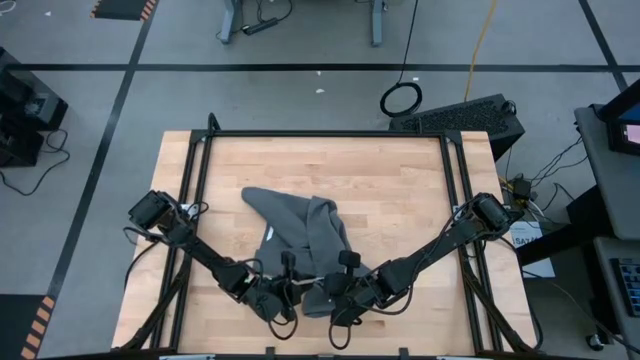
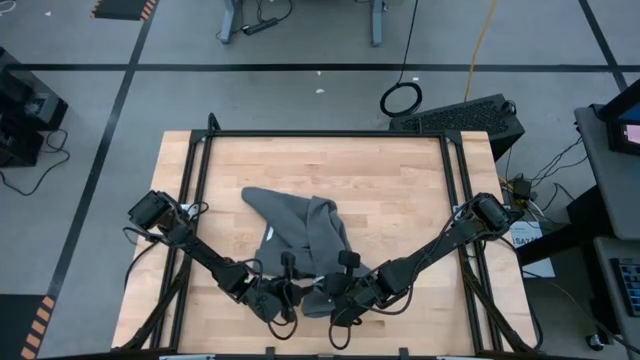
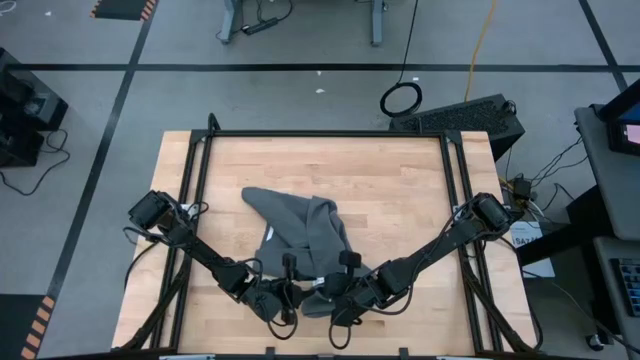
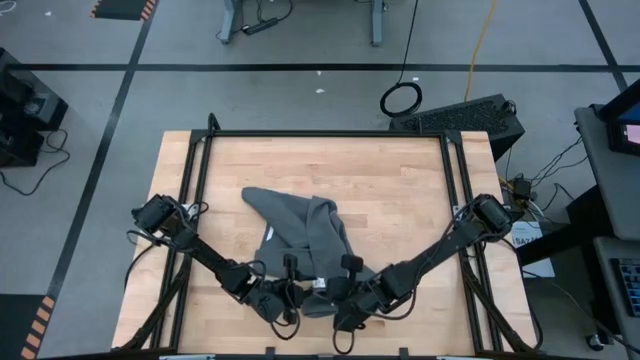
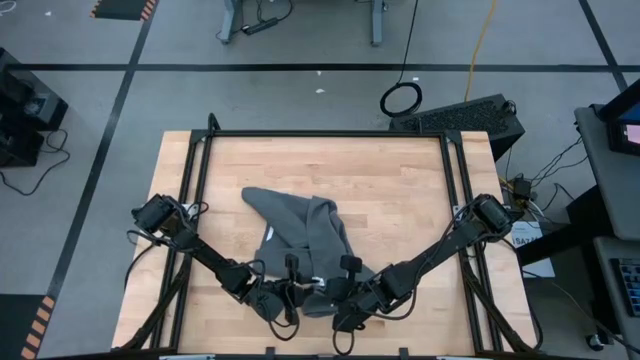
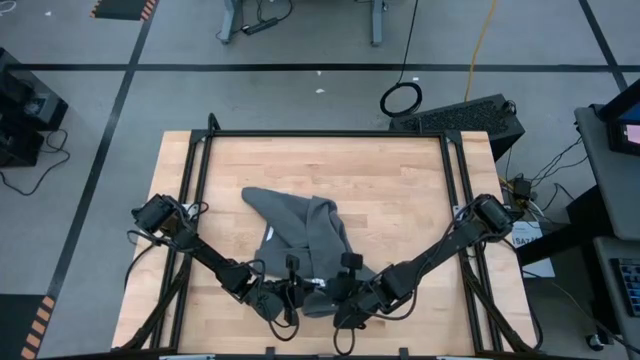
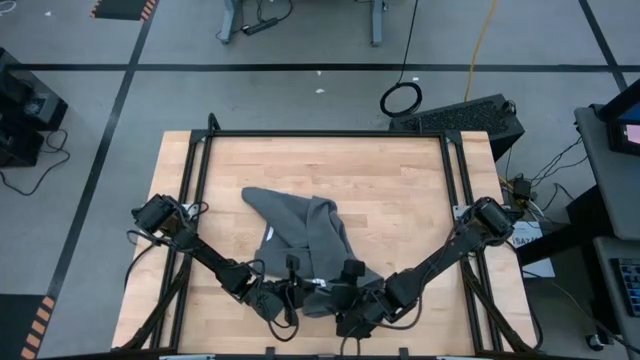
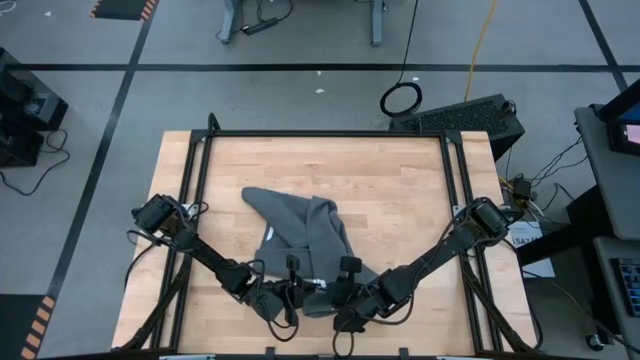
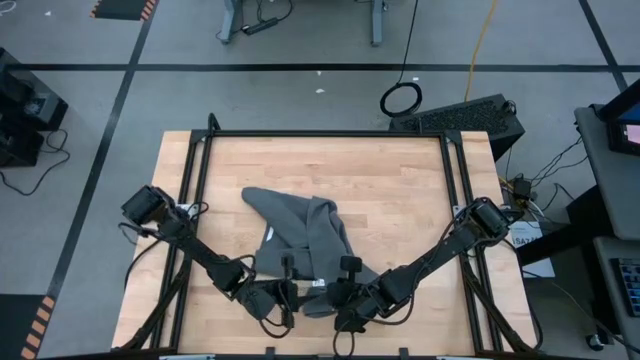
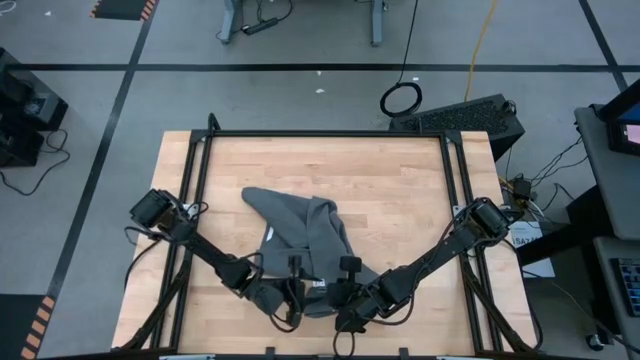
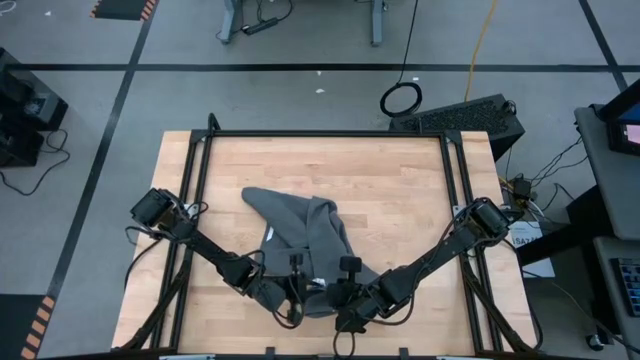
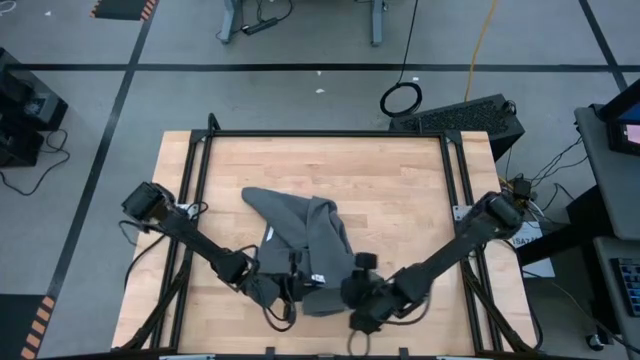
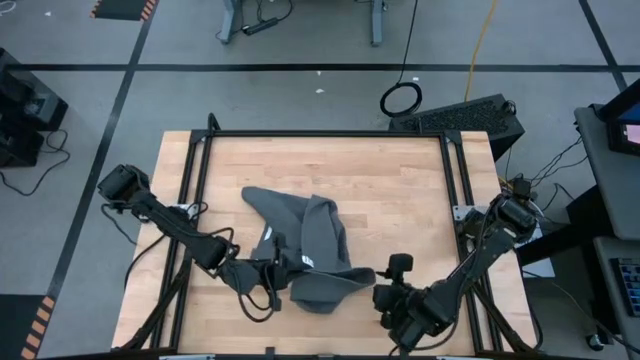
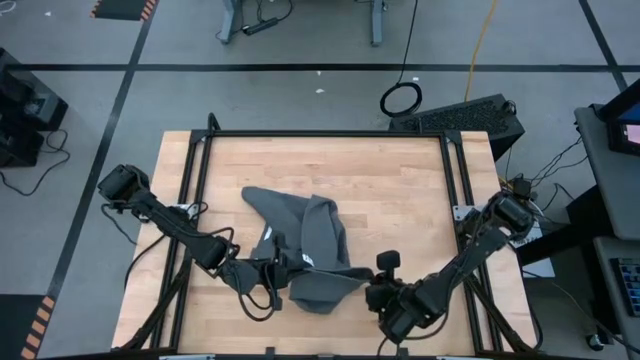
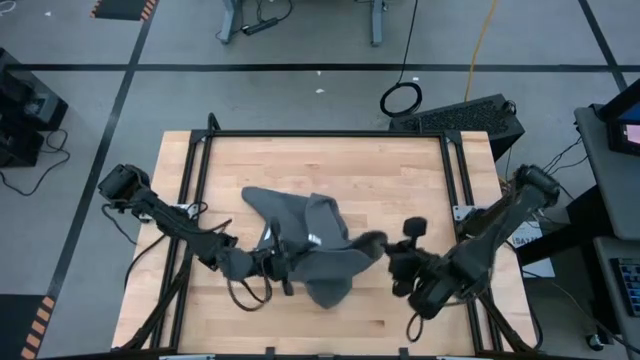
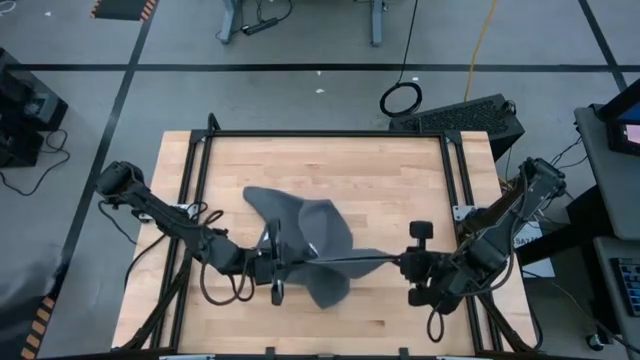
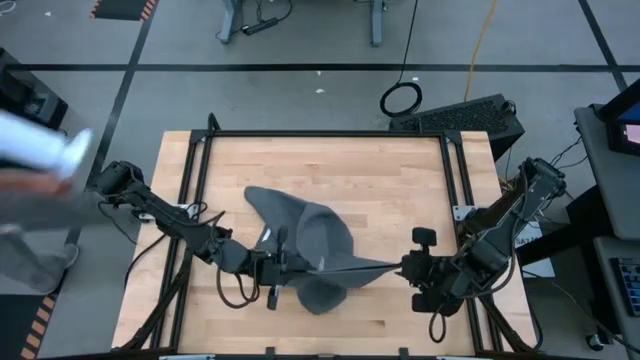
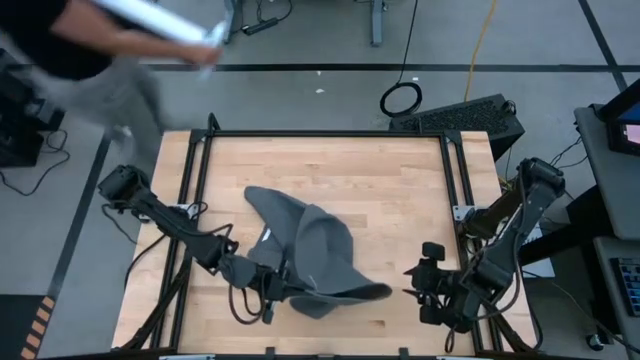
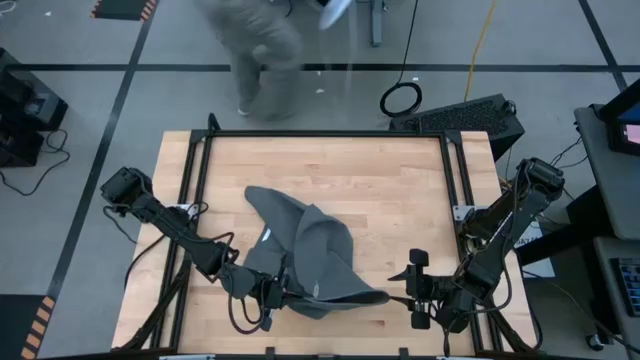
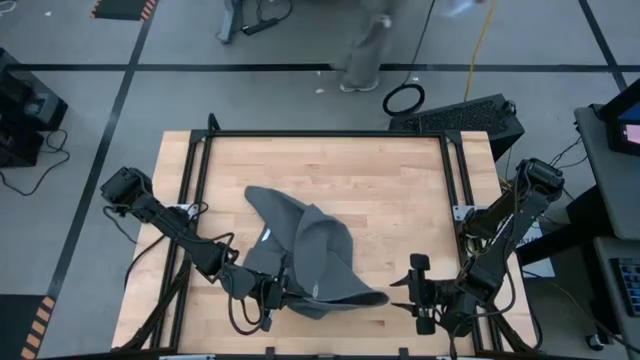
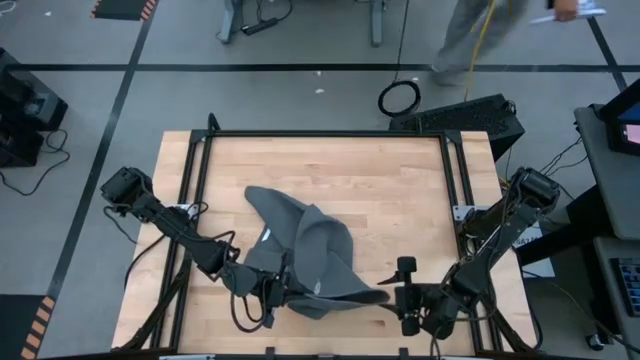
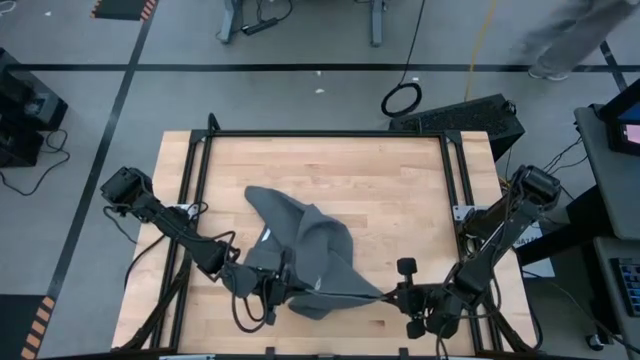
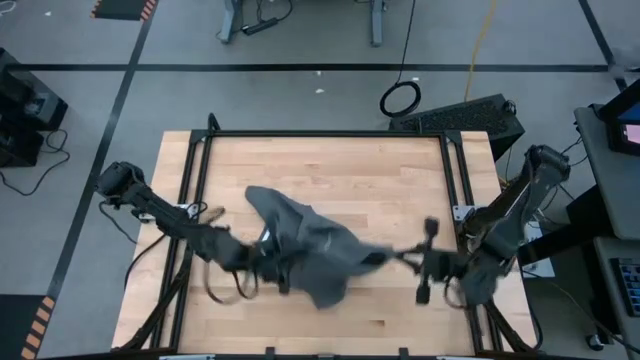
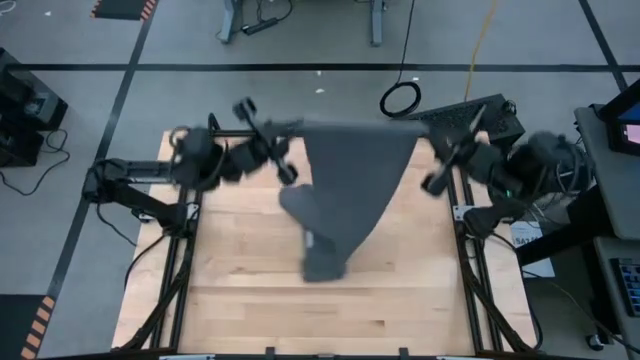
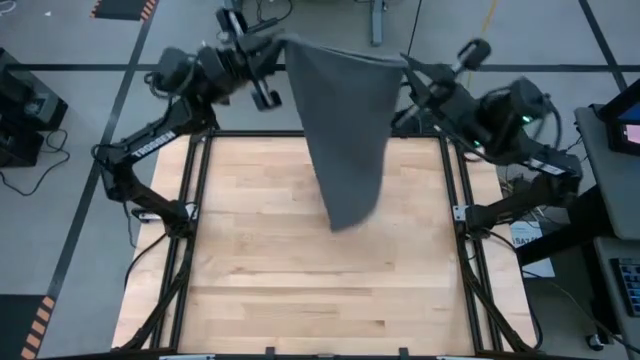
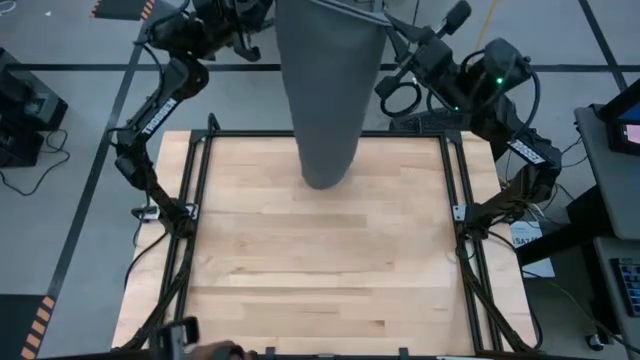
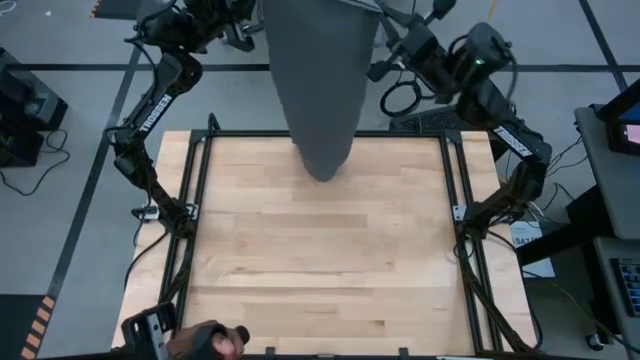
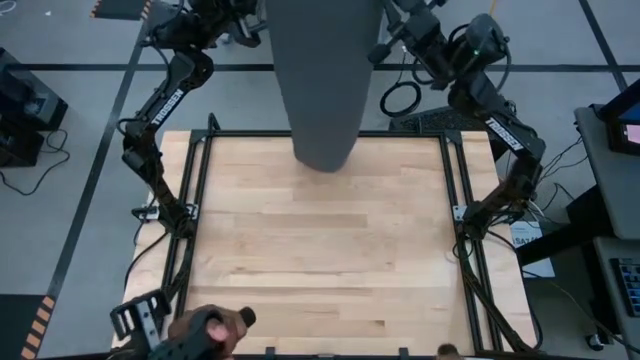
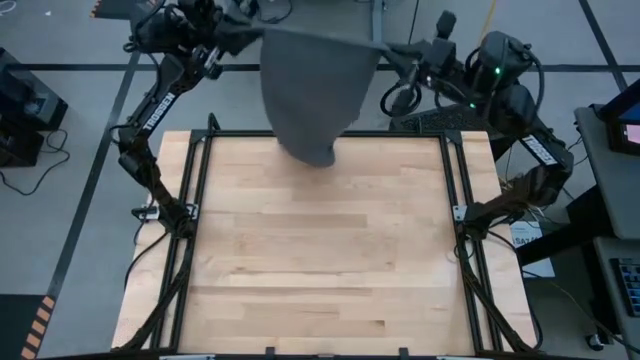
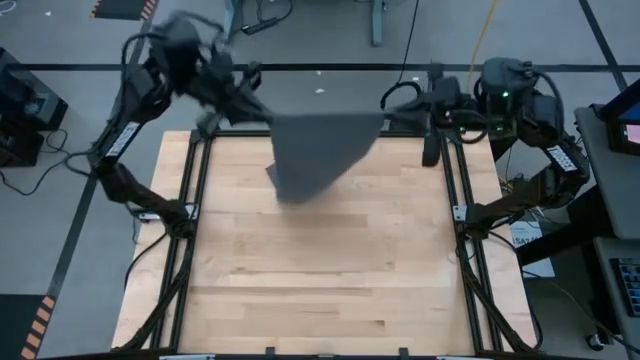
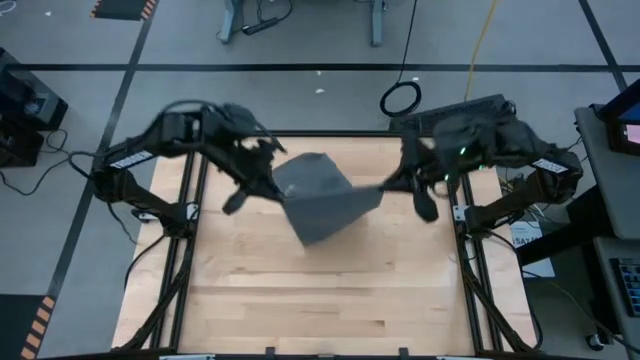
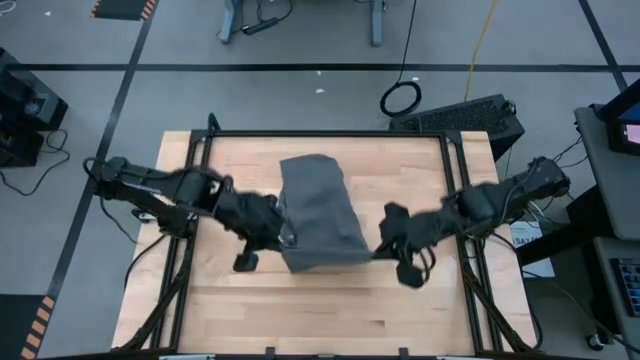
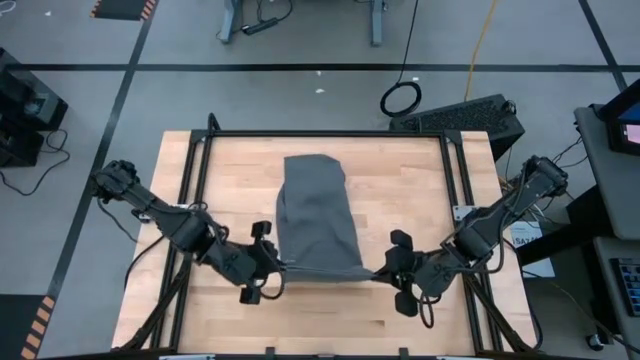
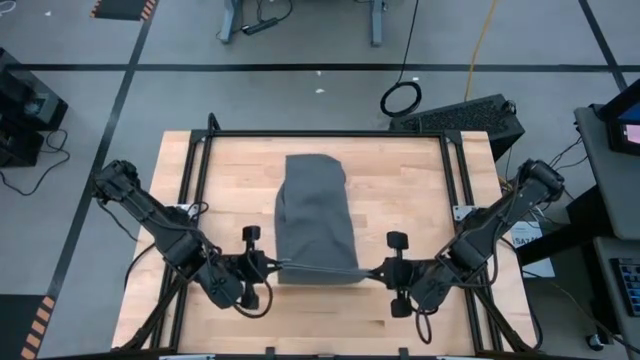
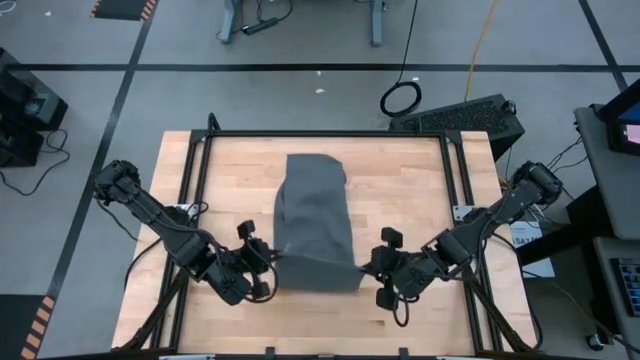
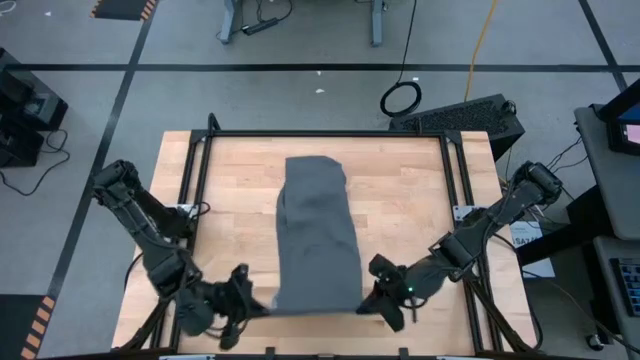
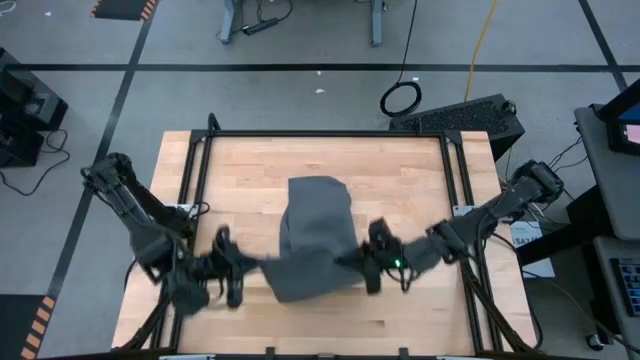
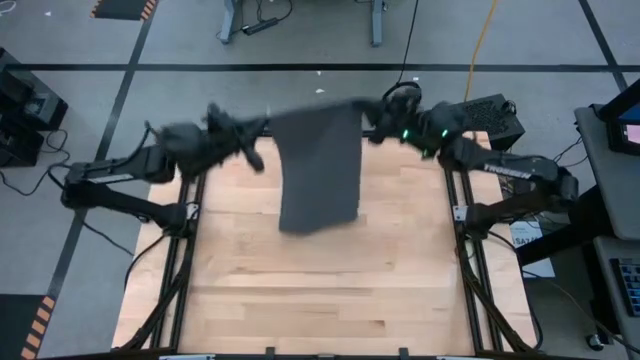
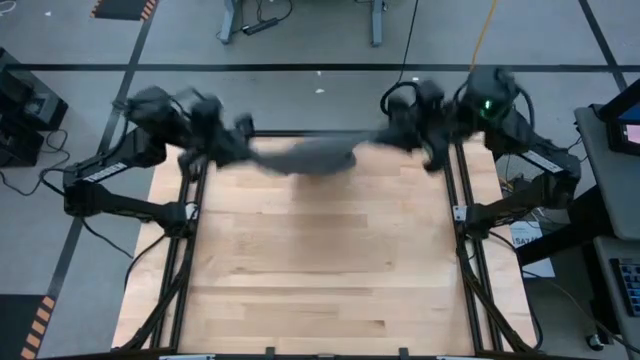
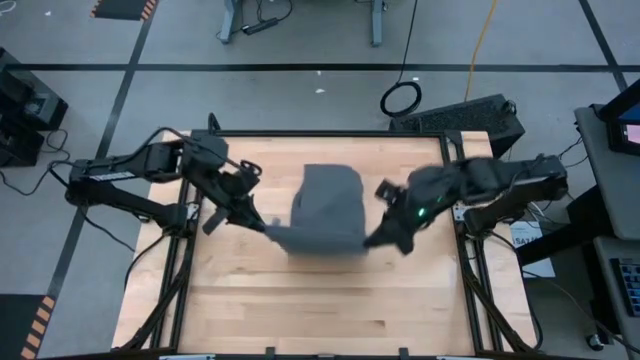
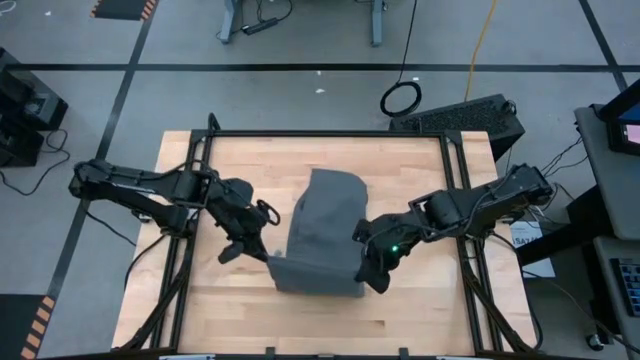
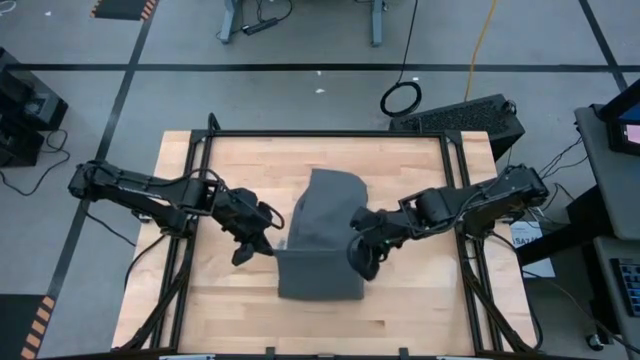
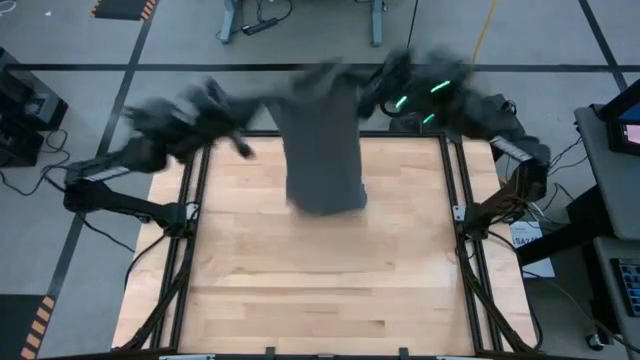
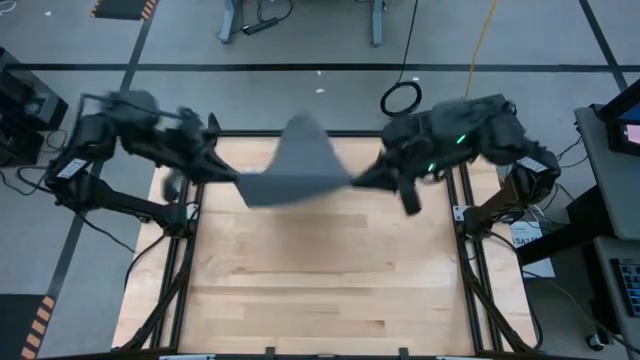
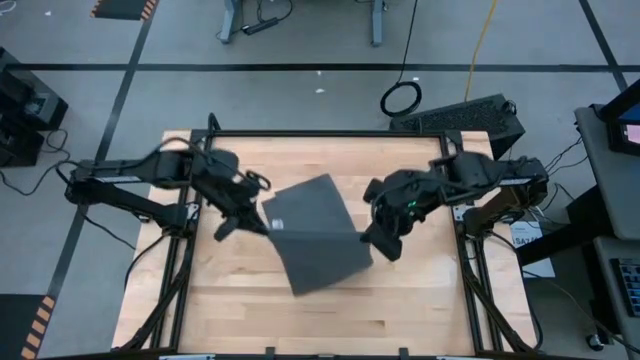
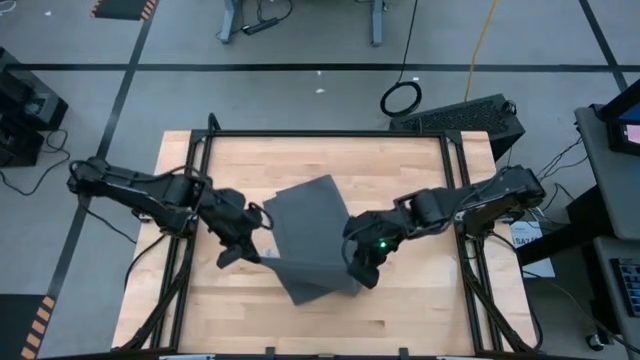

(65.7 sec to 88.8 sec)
Task: Roll towel into tight, uniform cylinder
Roll the gray towel
